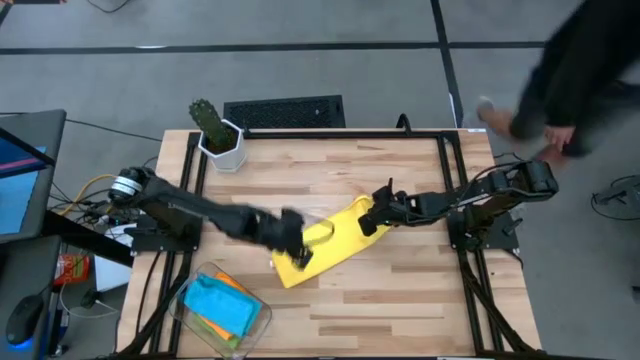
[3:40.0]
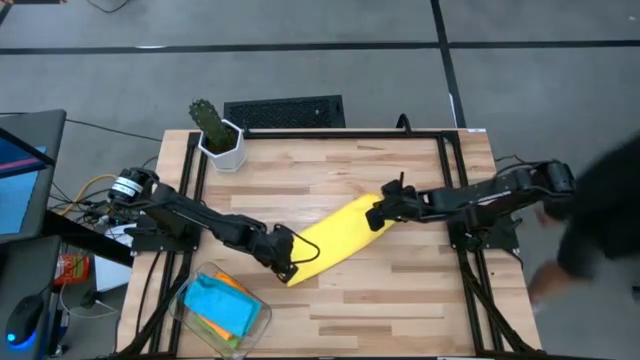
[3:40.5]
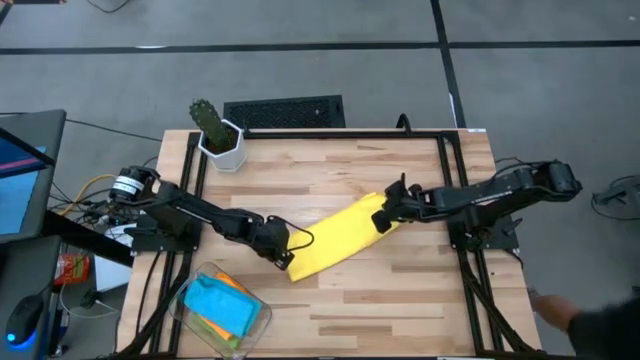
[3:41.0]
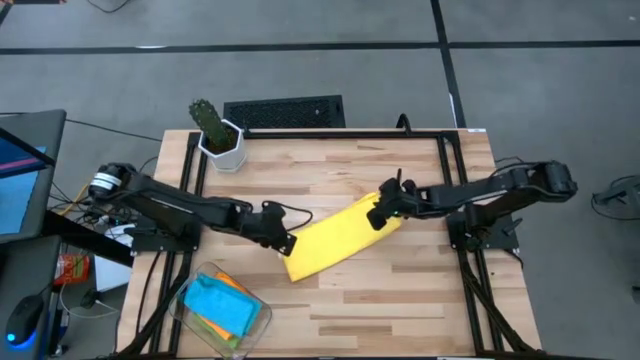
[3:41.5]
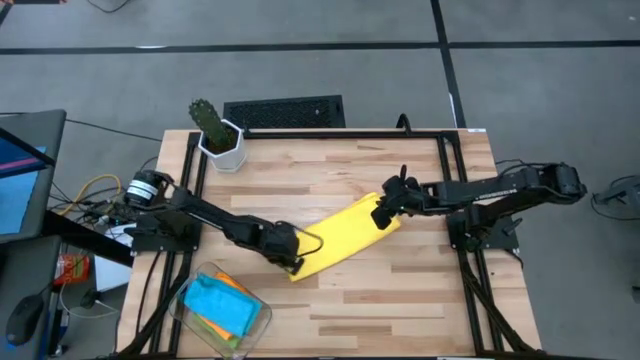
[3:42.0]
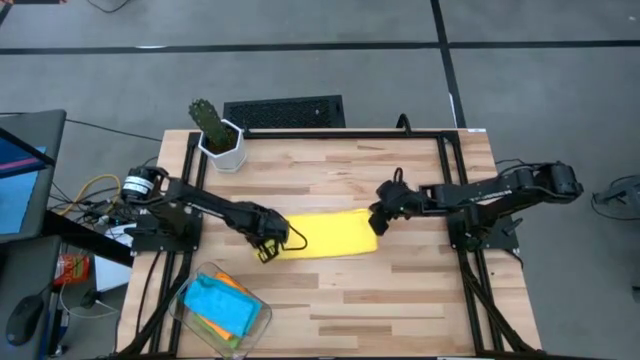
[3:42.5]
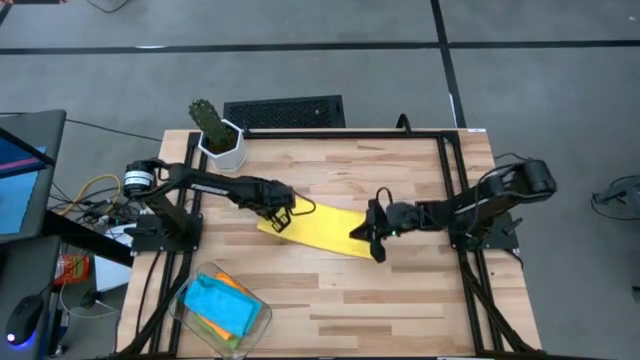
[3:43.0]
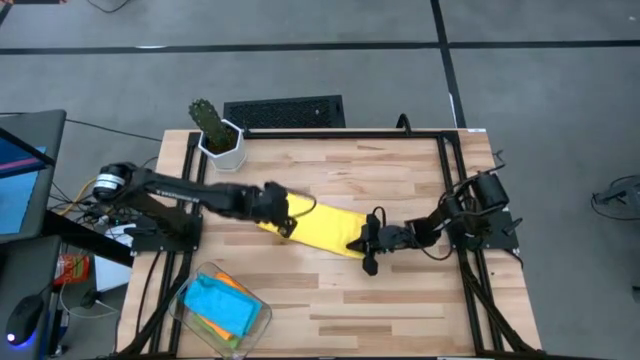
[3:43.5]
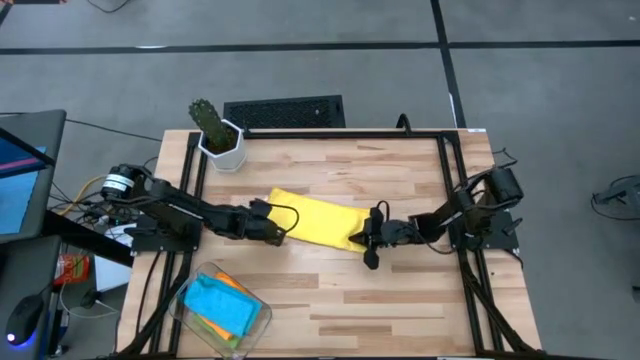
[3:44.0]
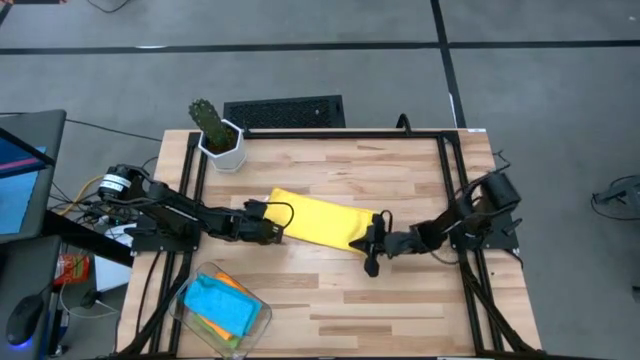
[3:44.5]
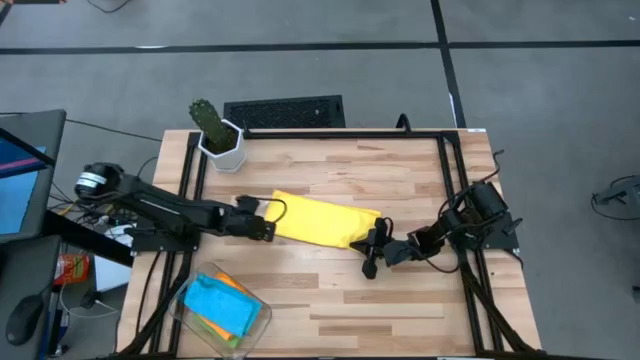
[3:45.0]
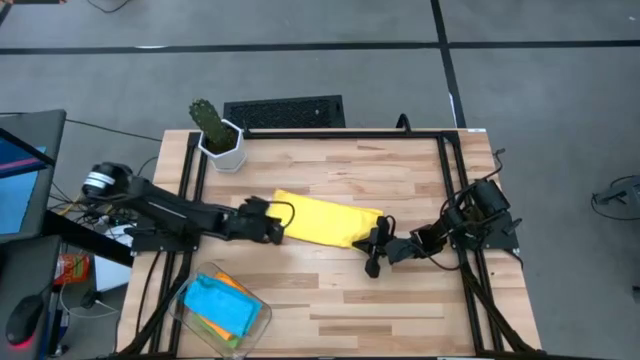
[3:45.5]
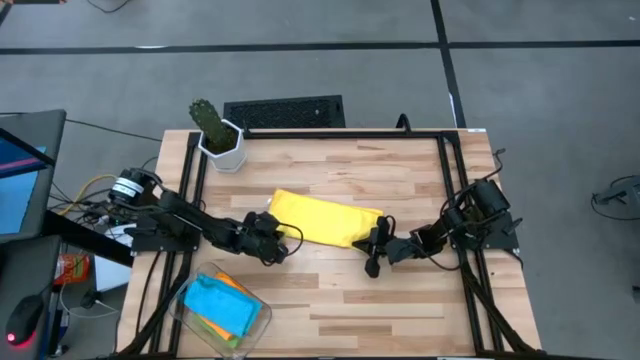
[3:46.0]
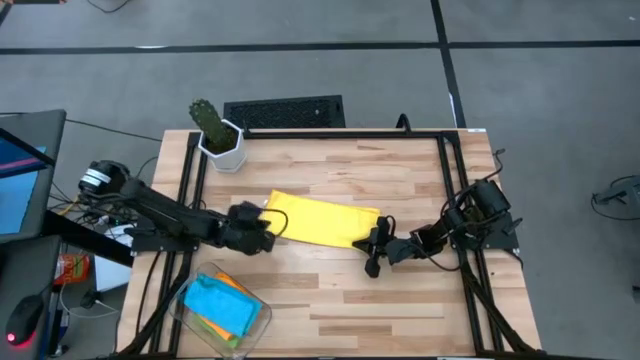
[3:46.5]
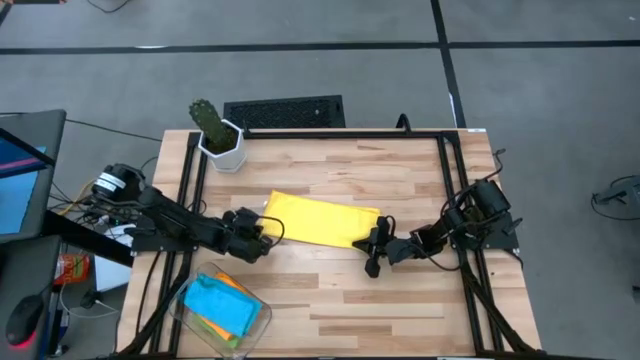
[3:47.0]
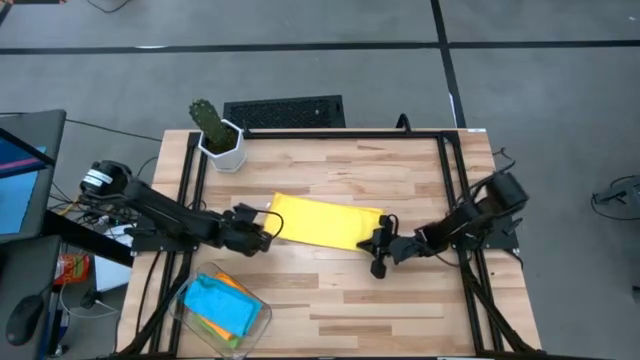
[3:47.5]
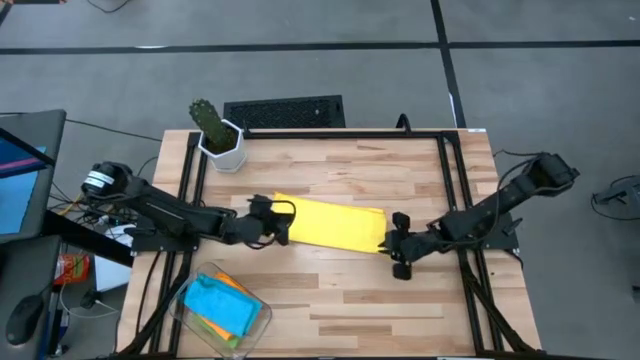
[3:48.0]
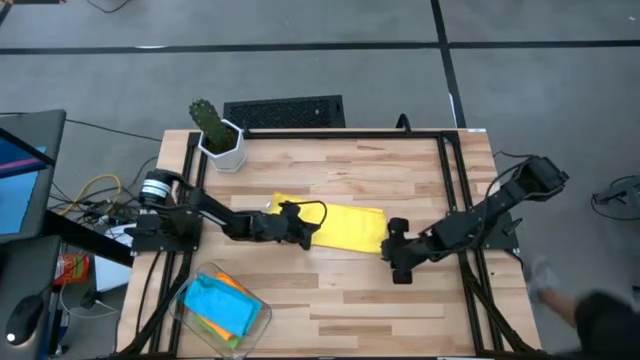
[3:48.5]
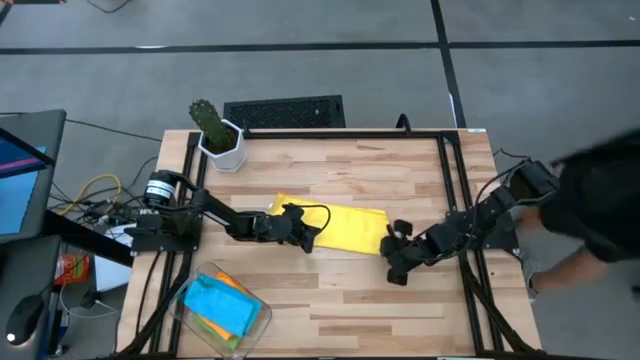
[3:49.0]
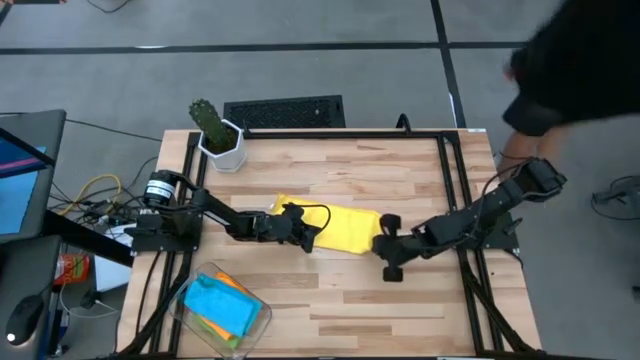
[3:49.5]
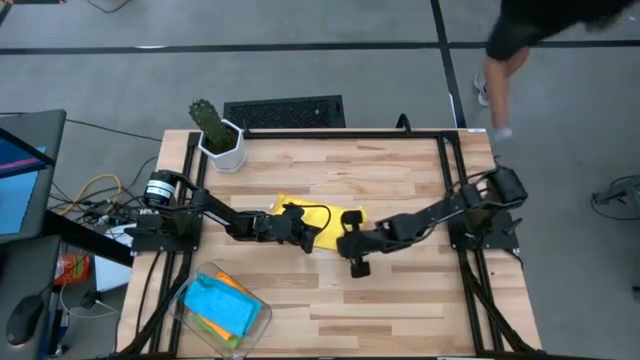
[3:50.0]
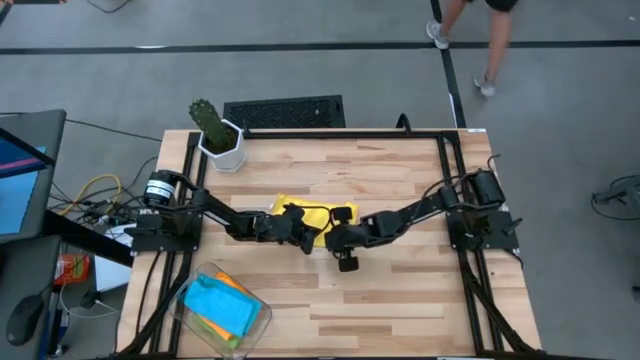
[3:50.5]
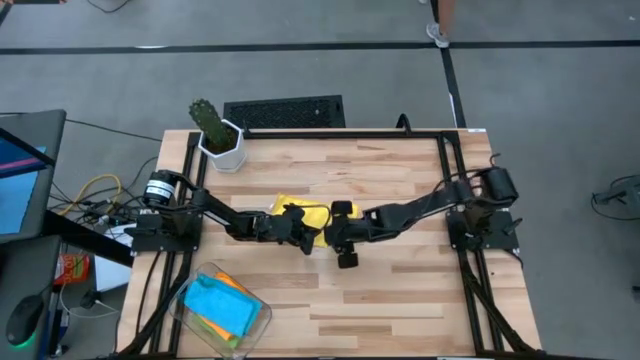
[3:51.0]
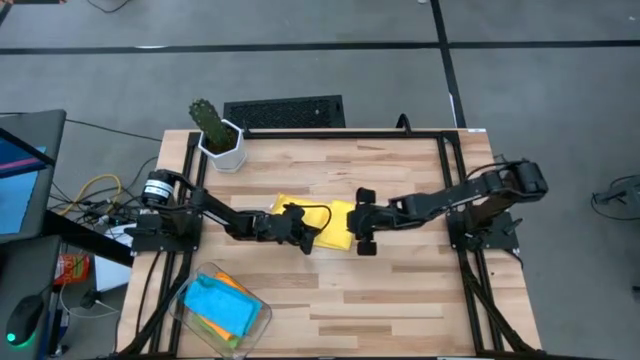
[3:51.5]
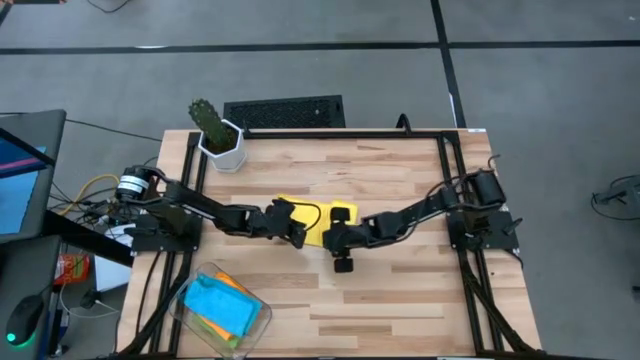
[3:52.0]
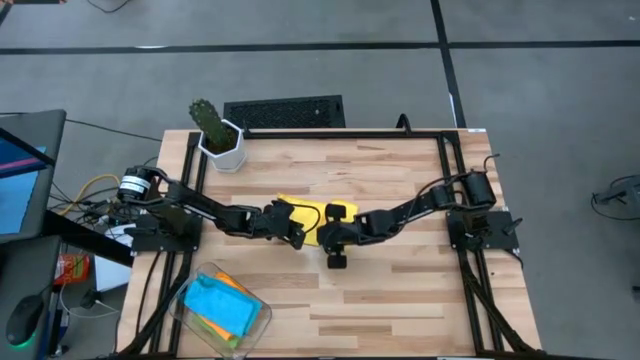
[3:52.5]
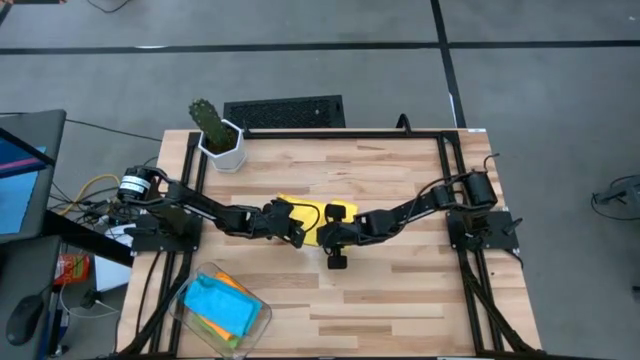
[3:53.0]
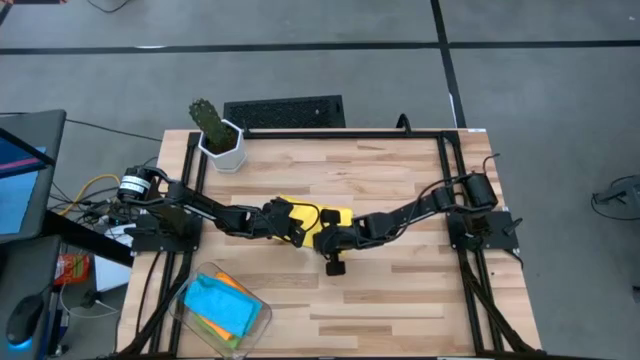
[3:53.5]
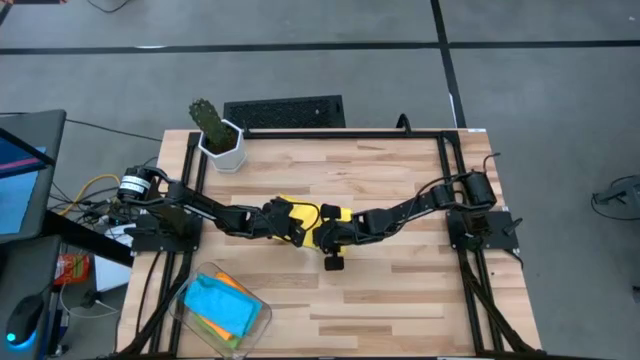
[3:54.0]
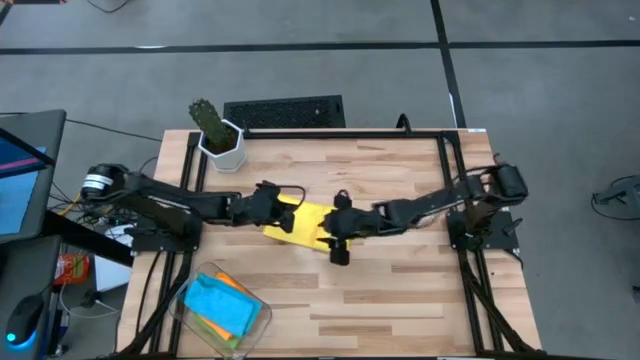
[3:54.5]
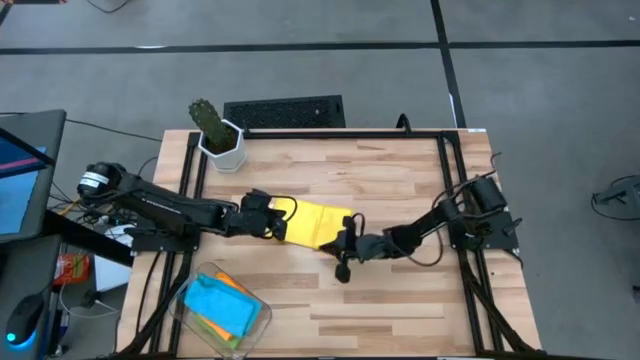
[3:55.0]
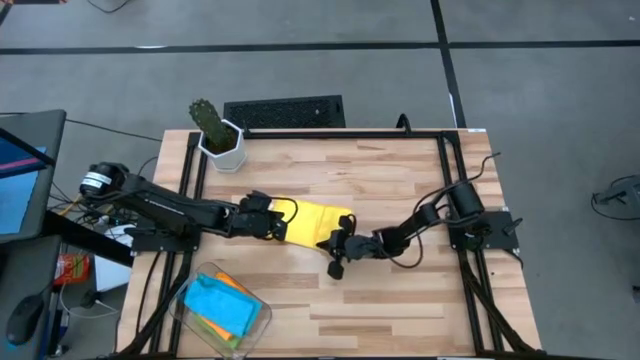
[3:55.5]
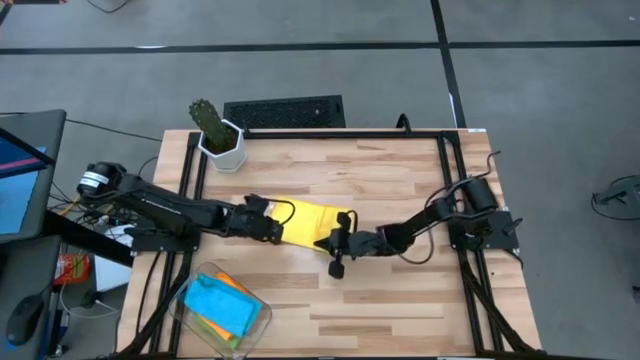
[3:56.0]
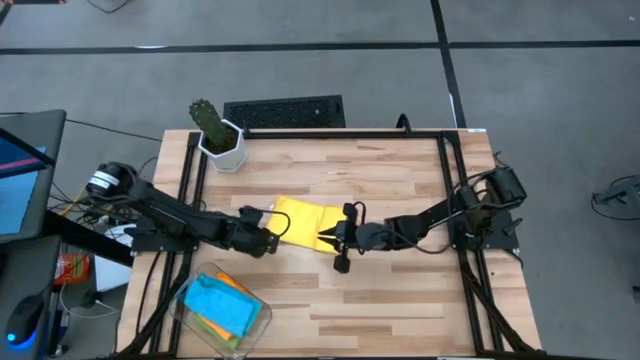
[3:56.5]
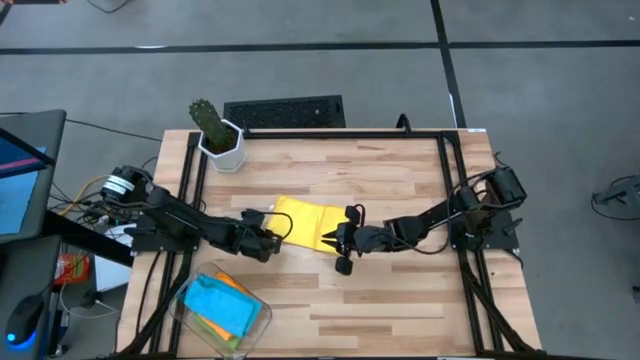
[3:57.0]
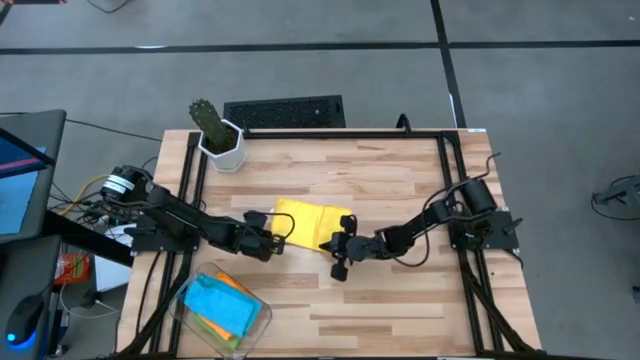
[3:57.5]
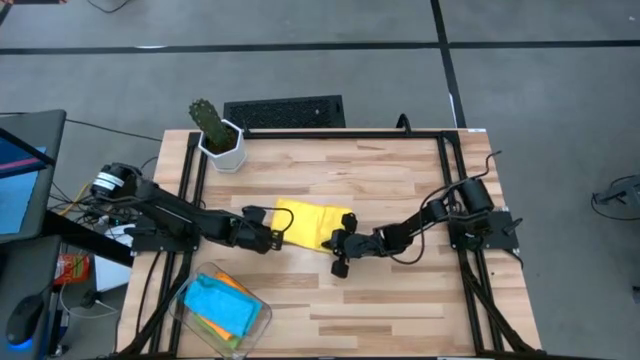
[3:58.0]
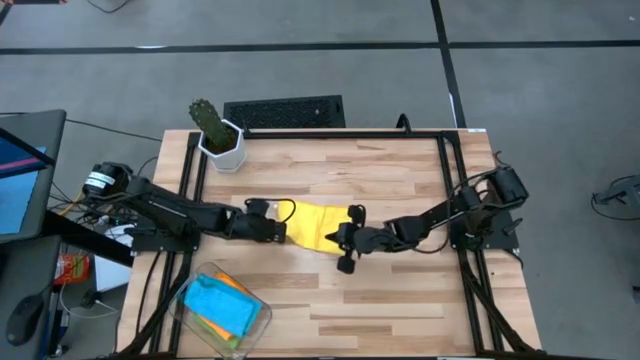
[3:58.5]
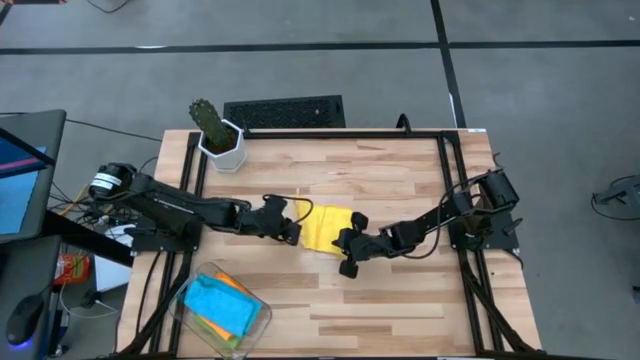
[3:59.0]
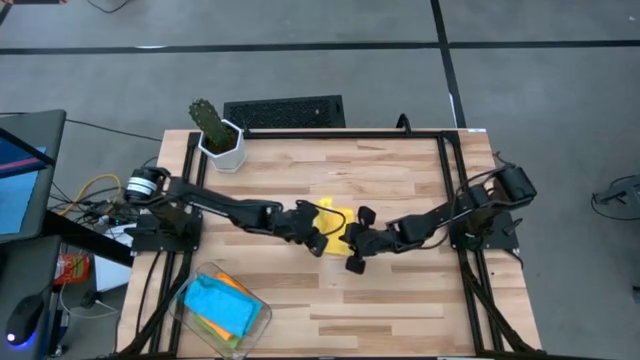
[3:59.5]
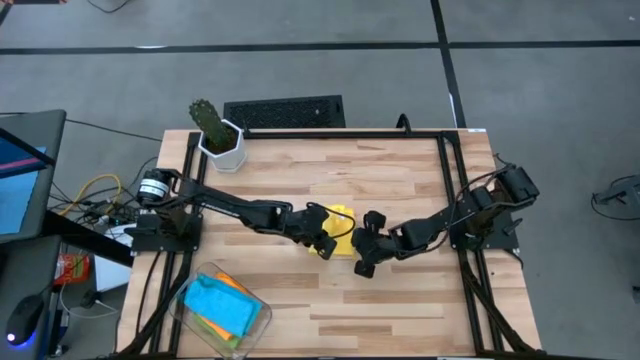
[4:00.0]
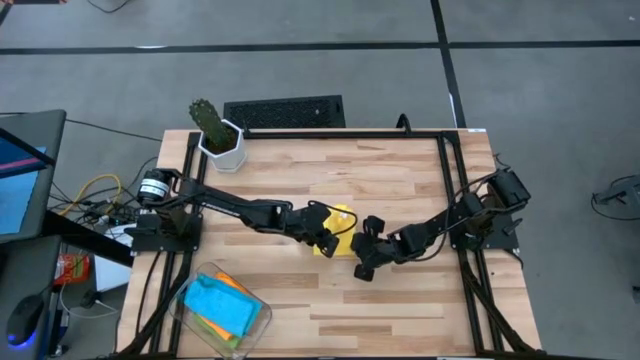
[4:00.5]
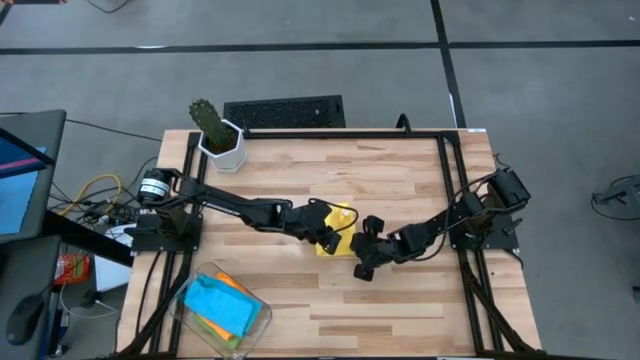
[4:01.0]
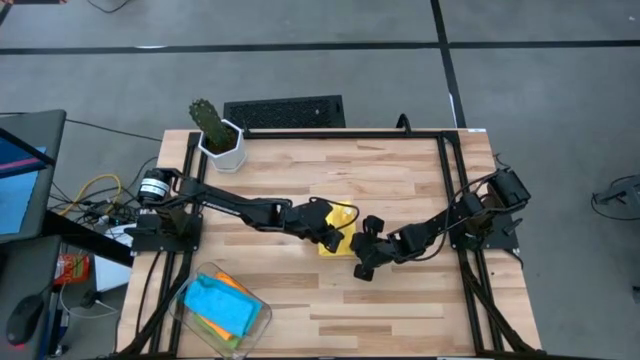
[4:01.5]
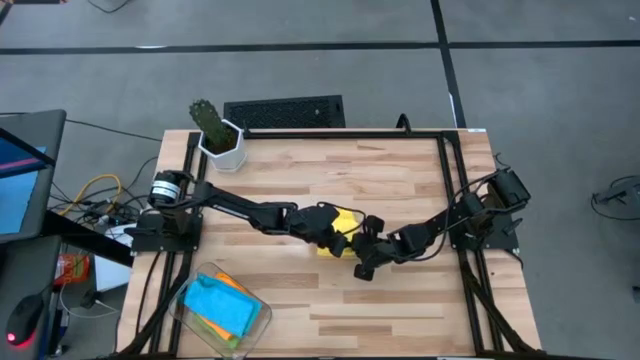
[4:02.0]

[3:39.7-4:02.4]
Task: Fold microfiber towels
Fold the yellow microfiber towel
